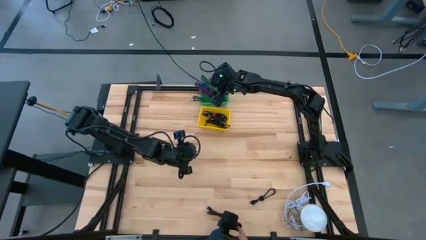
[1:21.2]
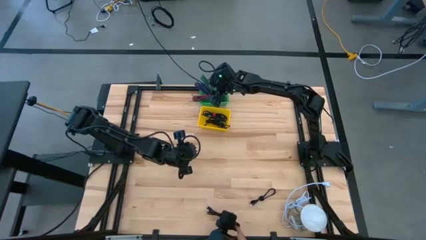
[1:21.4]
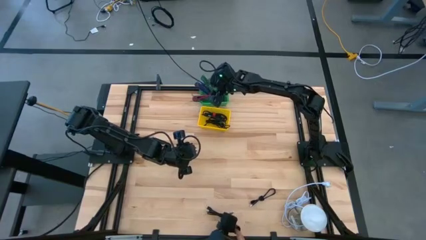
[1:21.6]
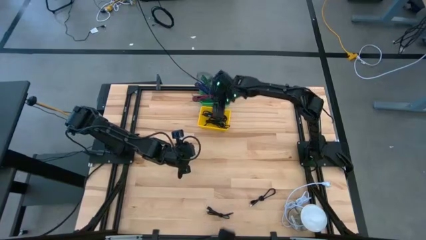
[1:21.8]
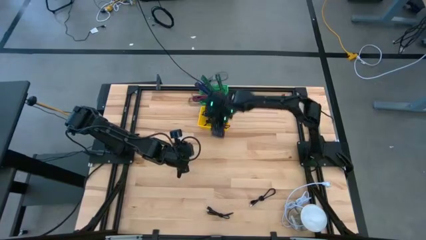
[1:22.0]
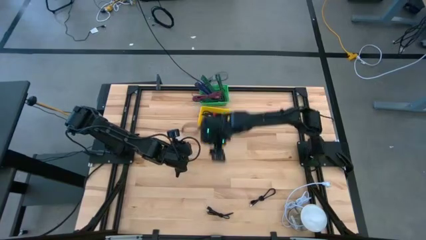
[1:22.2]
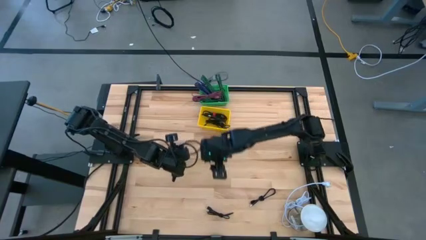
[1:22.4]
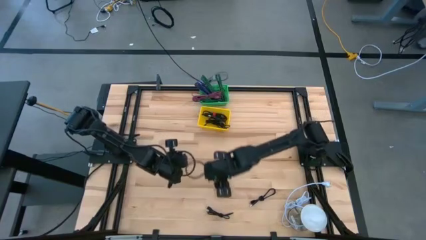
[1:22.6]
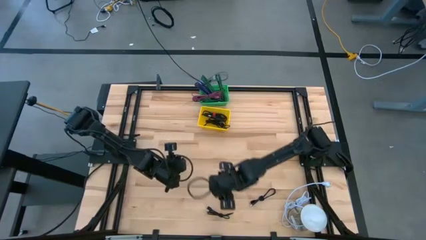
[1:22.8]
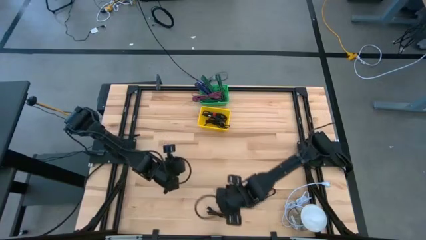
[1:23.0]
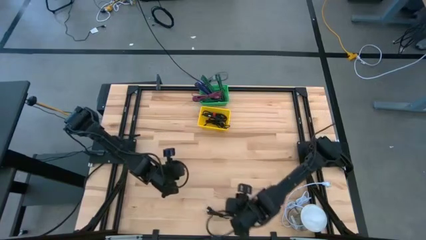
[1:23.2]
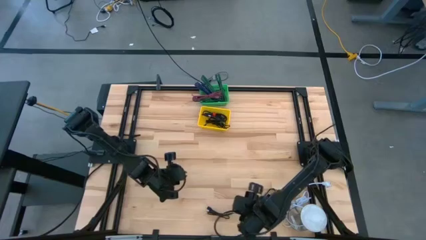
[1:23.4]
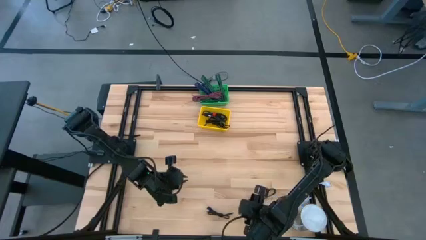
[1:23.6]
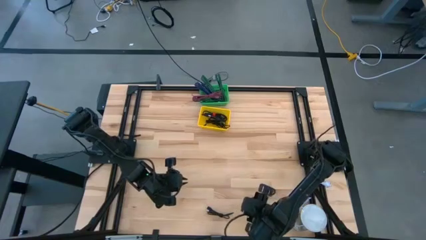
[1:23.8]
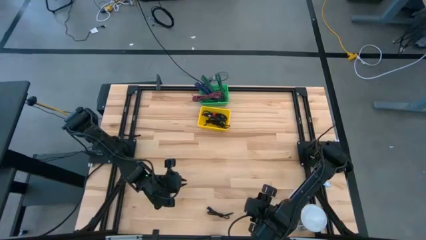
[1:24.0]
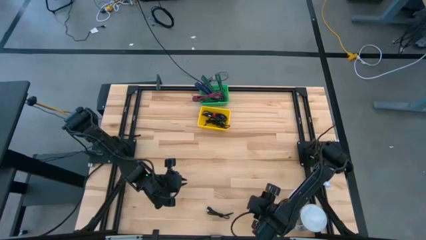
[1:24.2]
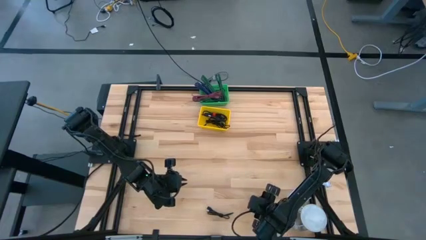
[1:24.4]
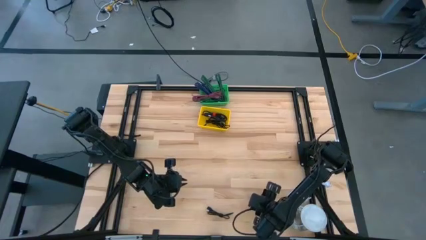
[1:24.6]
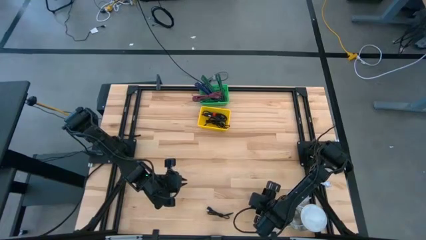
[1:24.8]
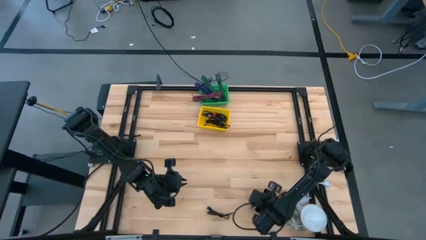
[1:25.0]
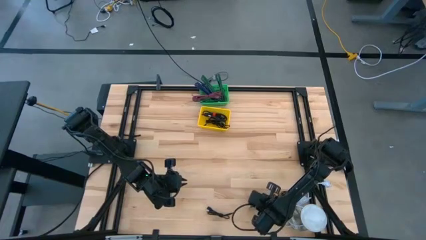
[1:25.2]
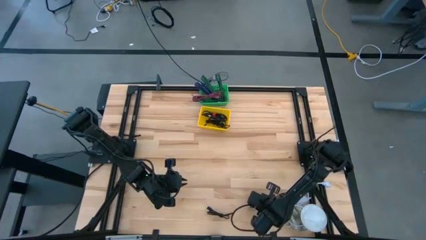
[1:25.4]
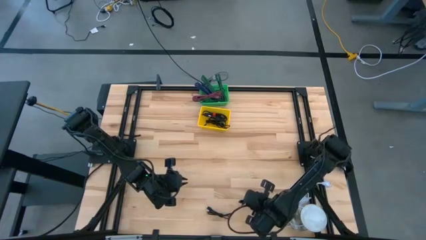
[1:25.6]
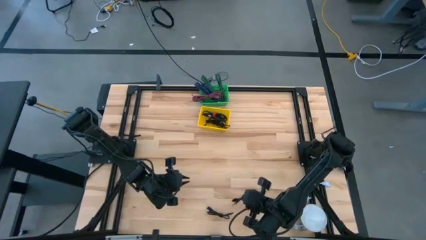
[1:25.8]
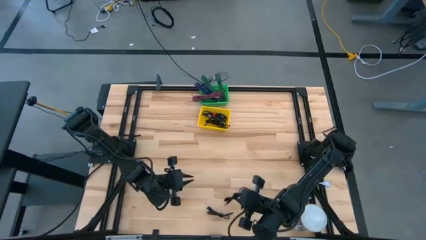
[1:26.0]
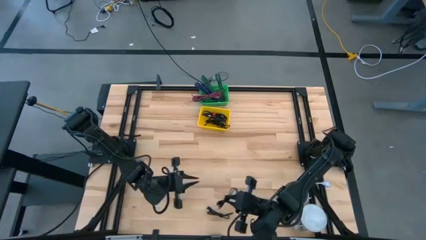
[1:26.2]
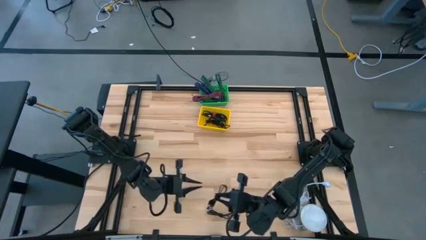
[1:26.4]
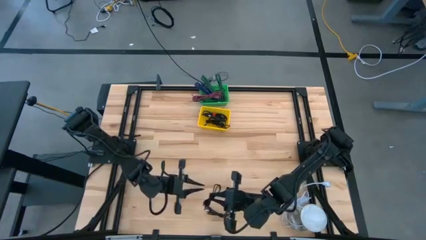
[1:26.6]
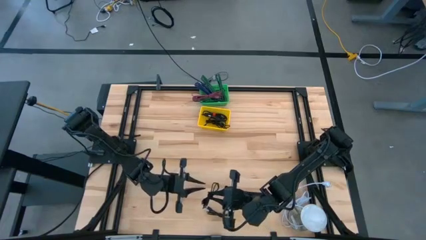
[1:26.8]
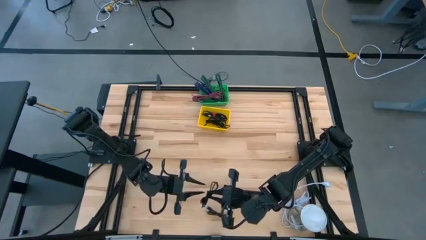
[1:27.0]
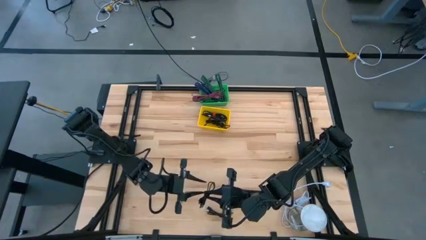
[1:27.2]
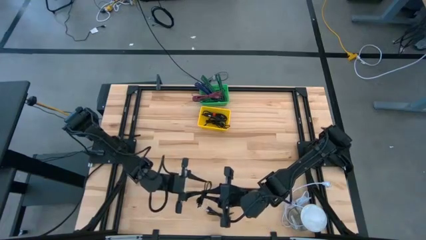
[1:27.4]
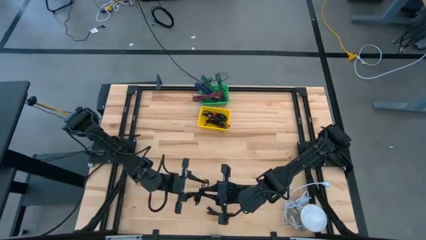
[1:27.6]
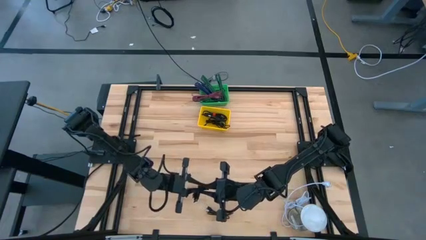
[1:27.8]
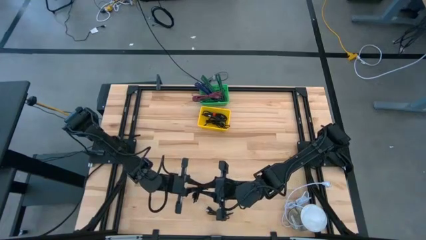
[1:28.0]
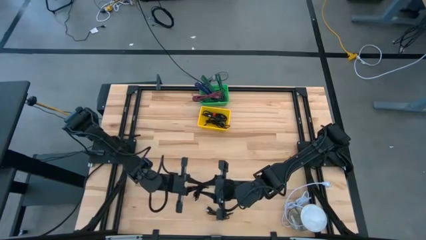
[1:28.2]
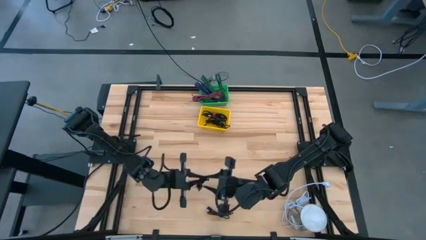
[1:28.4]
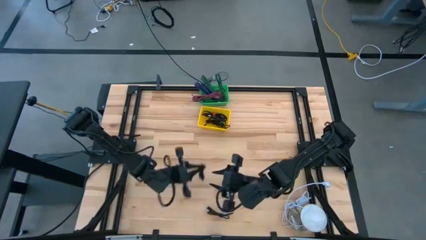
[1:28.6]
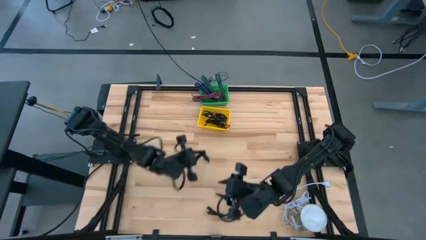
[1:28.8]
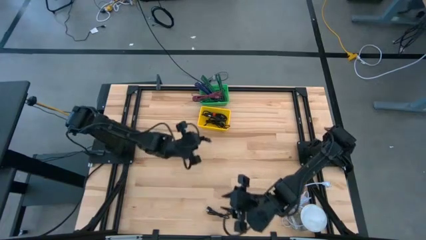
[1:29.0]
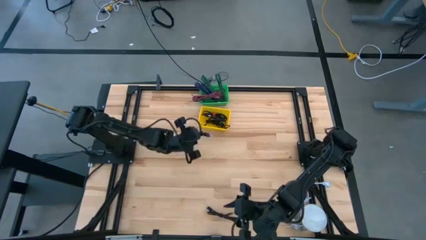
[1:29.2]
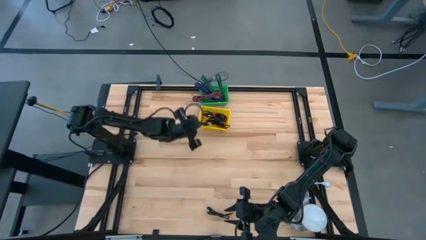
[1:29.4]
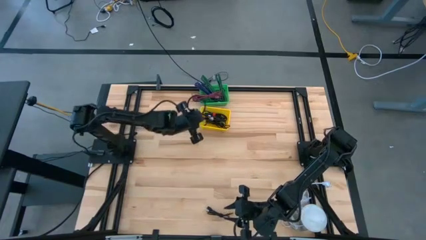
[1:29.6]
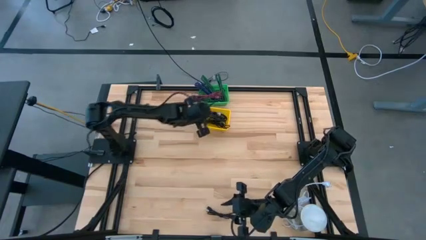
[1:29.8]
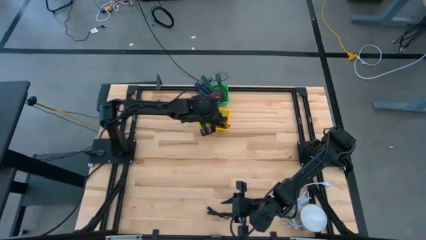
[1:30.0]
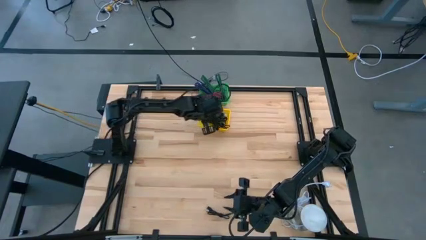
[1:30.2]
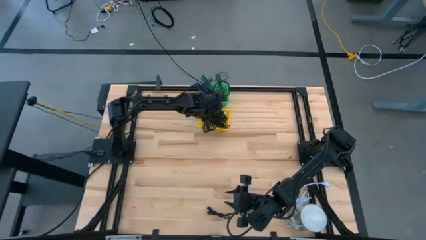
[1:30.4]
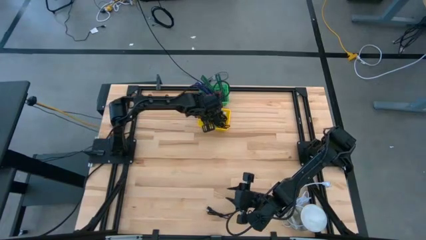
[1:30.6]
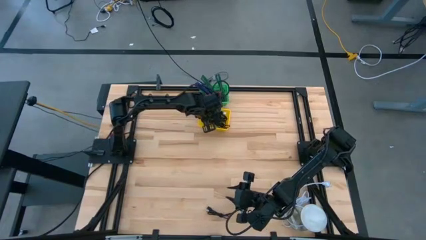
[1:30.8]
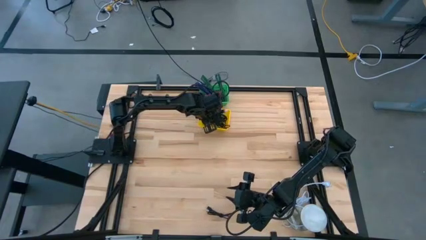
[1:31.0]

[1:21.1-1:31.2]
Task: Pick & Place USB Port
Put the black charger cable into the yellow basket

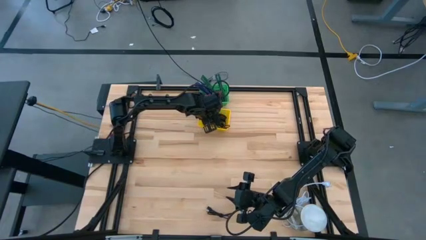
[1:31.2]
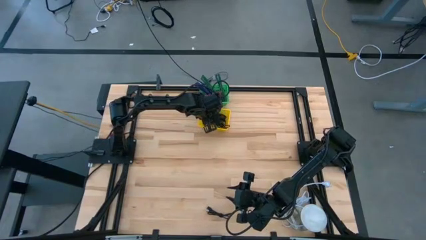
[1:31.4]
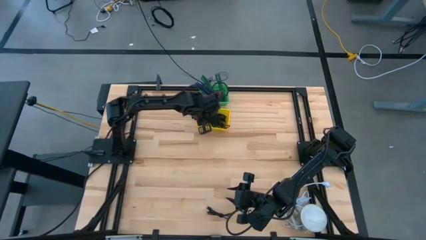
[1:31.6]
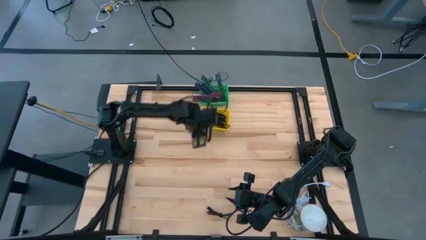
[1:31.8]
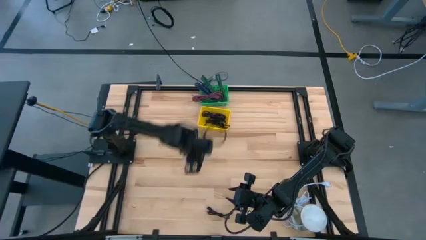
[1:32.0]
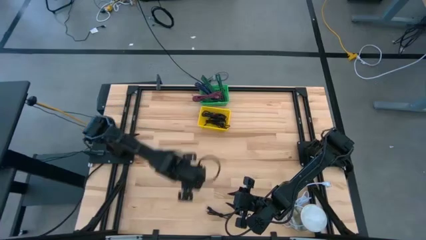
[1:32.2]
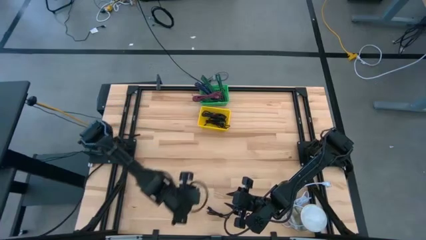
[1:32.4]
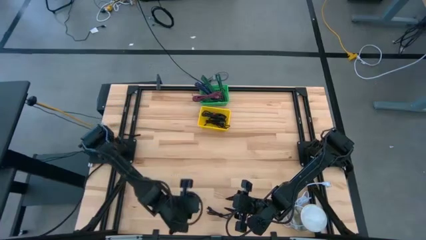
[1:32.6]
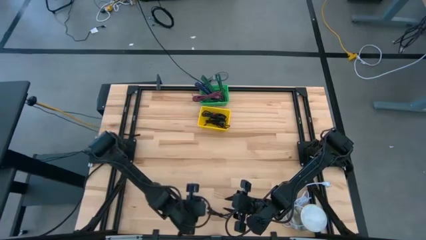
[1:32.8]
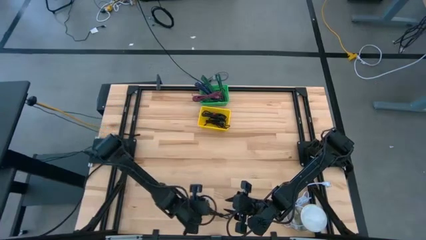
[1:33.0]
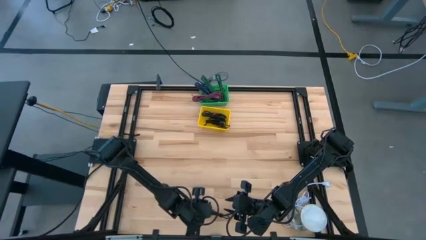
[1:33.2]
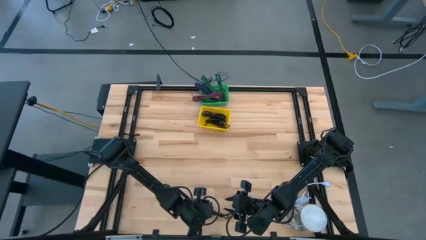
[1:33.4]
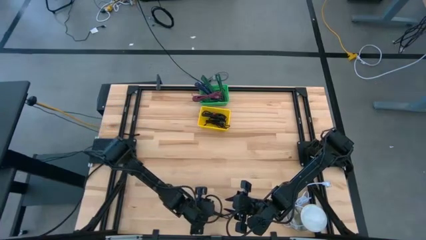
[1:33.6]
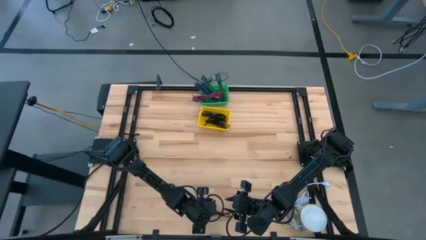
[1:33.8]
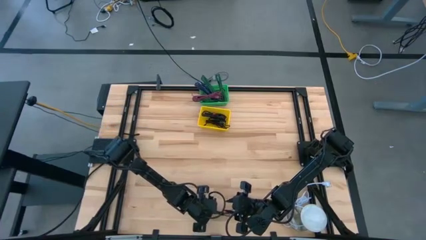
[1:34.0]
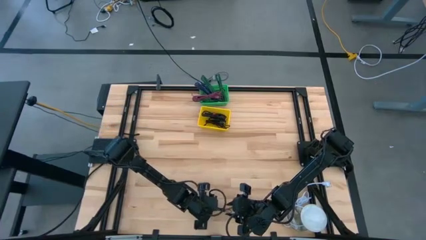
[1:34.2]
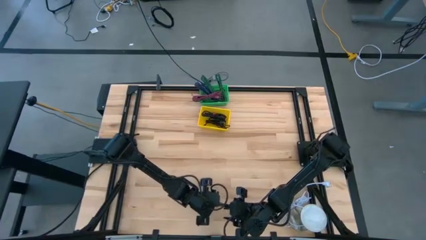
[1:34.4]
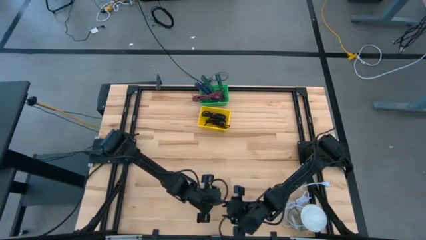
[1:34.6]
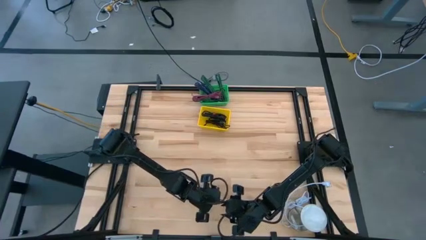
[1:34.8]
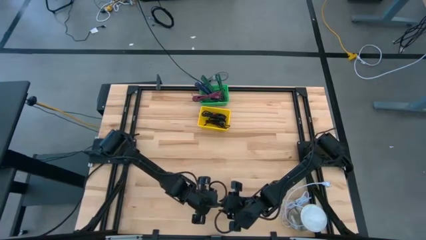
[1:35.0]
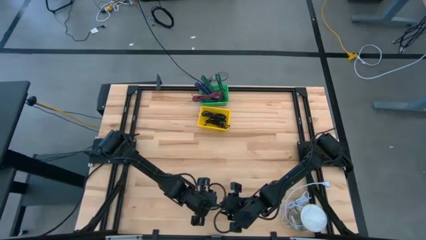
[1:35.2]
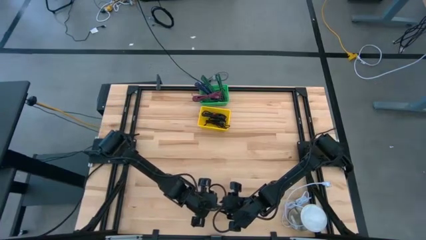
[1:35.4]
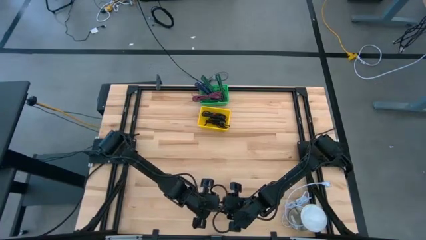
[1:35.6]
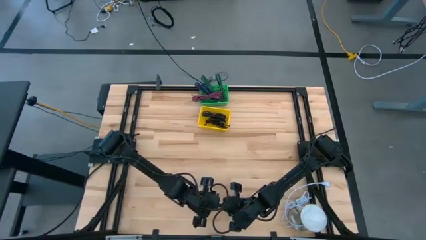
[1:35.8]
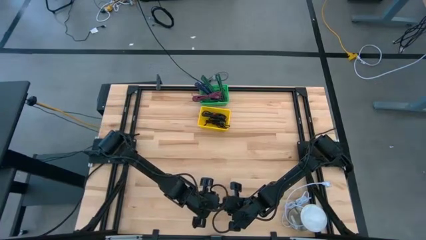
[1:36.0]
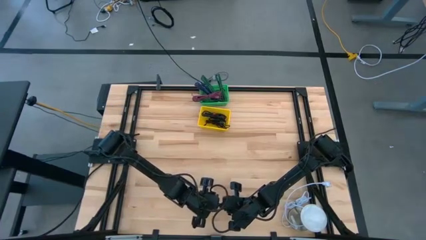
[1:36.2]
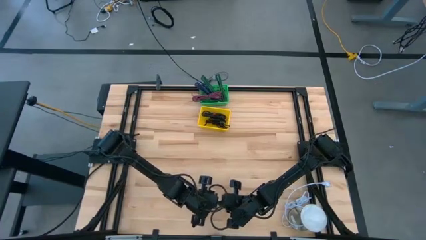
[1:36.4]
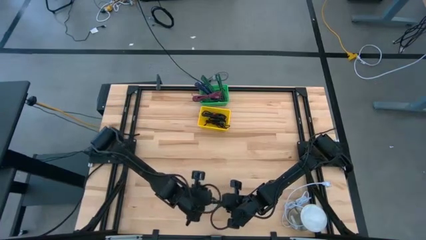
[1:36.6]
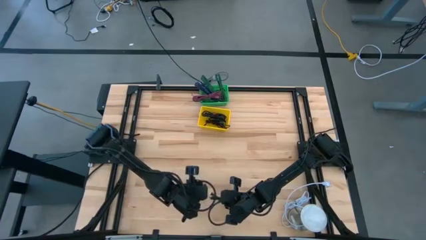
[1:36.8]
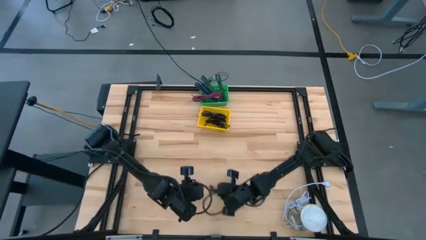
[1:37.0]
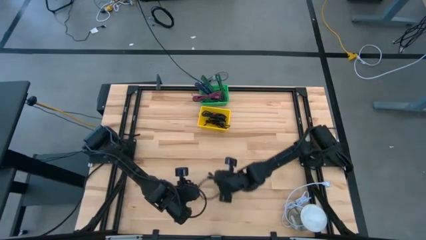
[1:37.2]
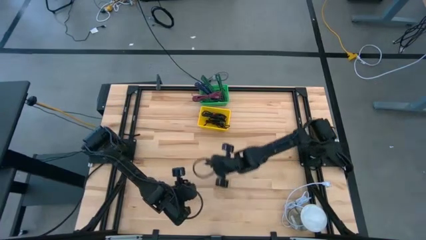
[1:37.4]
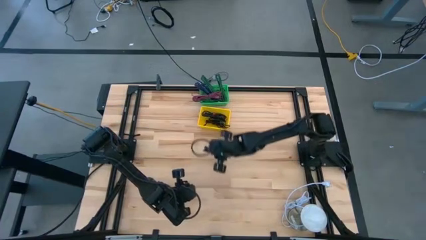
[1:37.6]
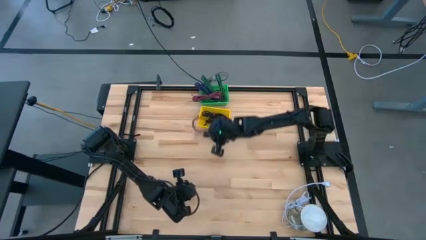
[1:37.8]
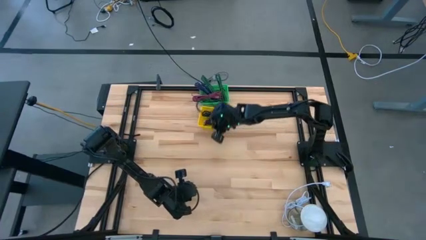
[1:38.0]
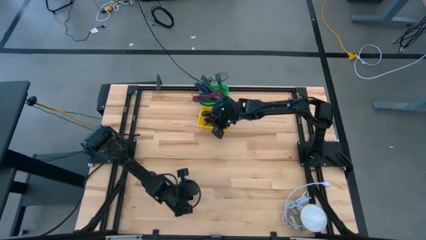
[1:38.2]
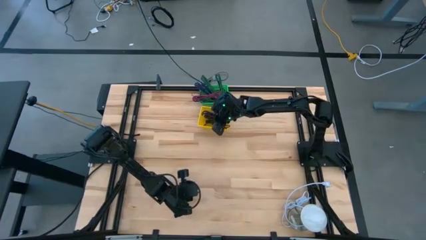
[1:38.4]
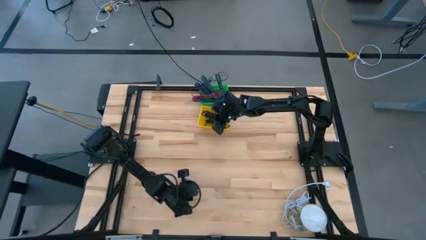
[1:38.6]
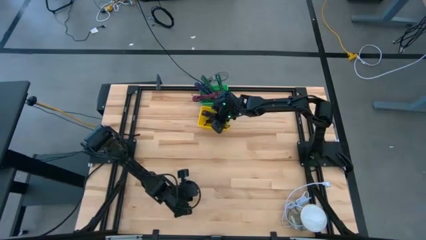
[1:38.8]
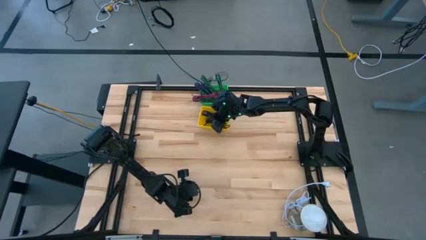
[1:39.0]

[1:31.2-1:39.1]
Put the black charger cable into the yellow basket
